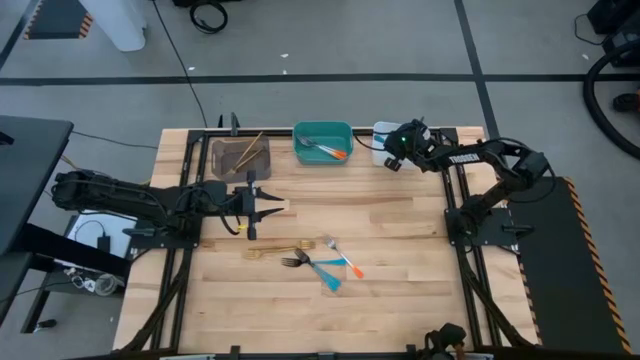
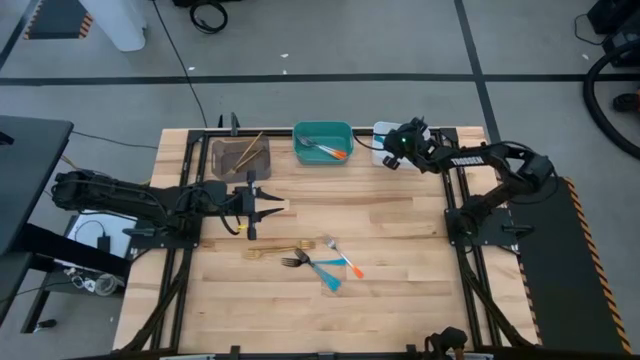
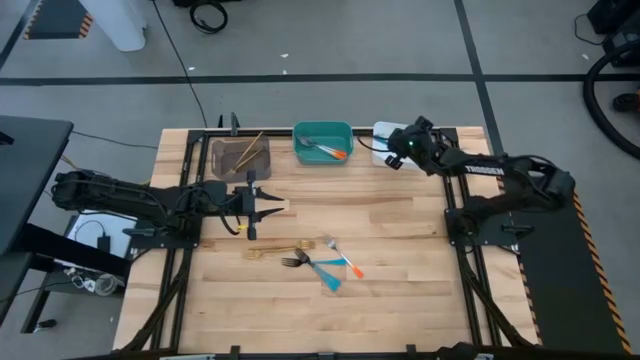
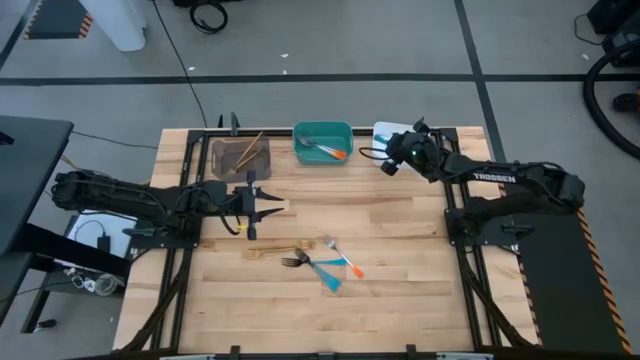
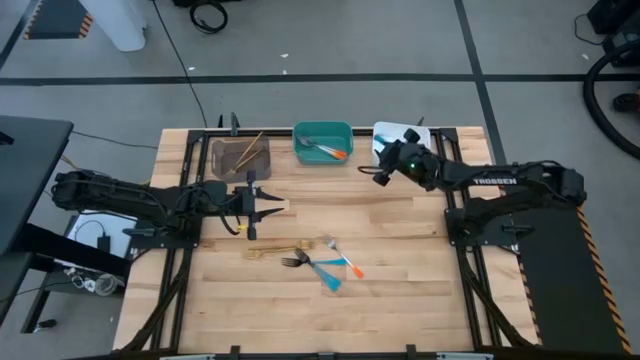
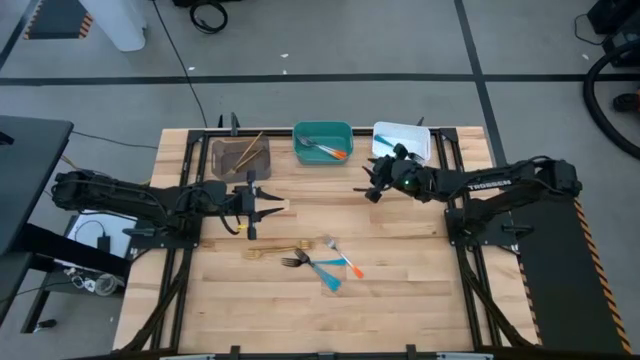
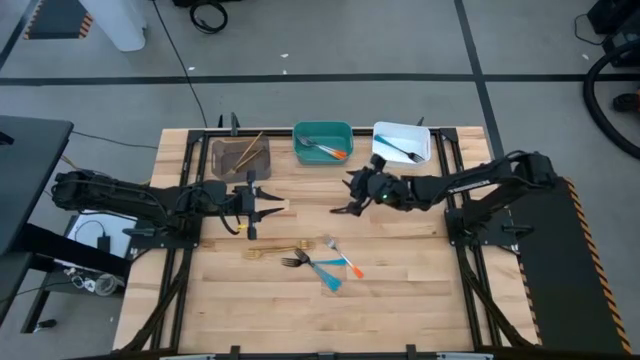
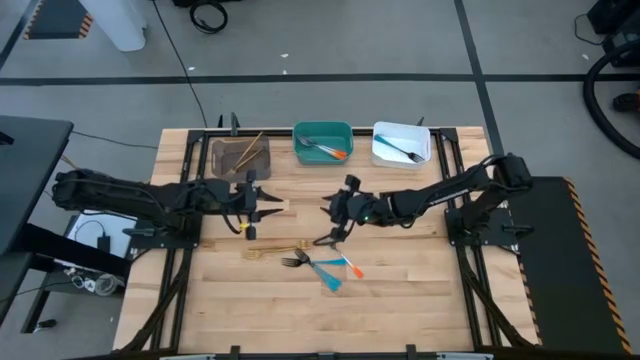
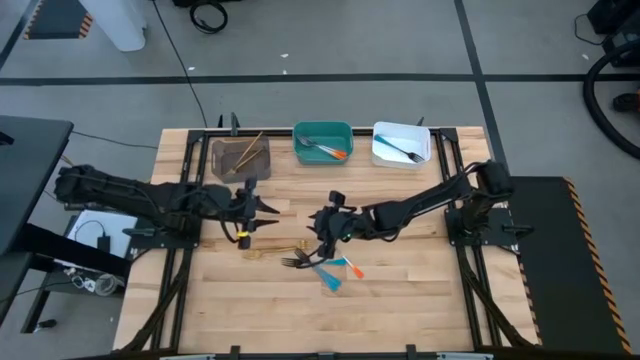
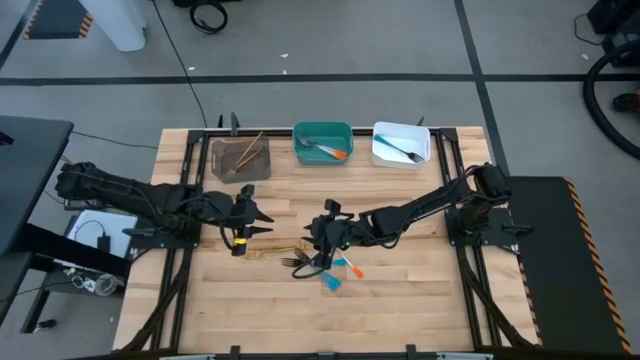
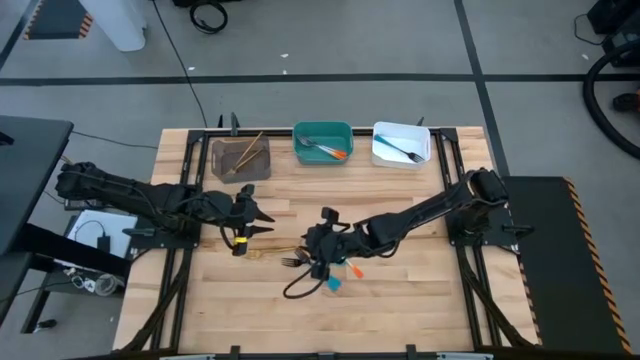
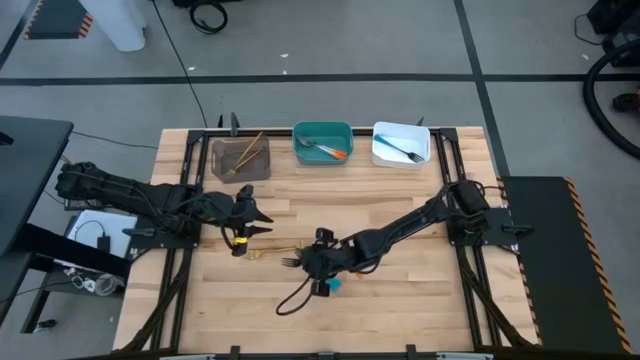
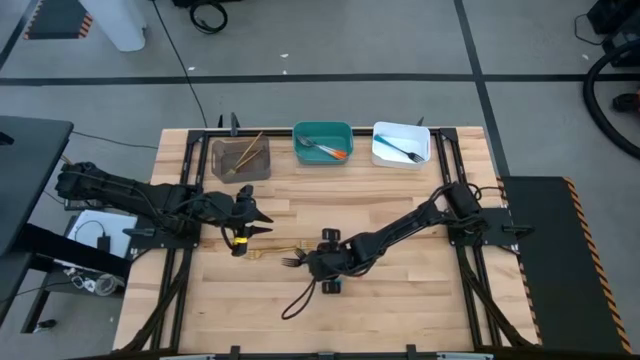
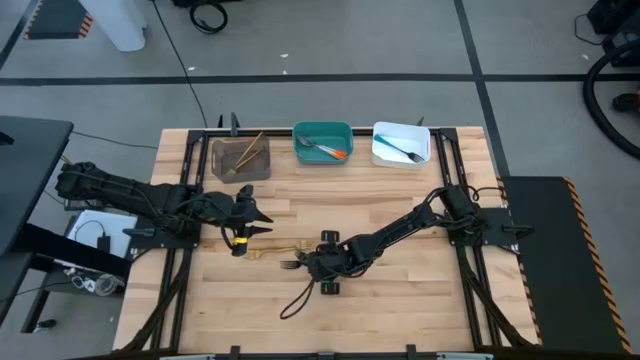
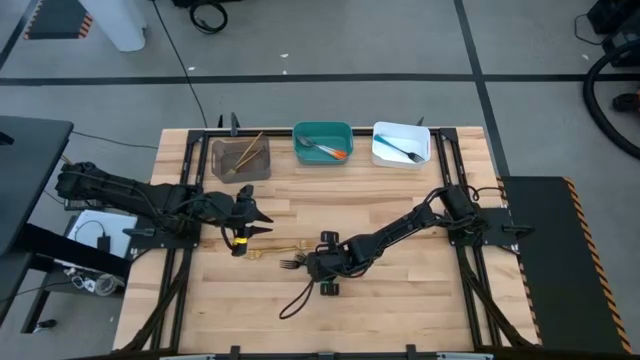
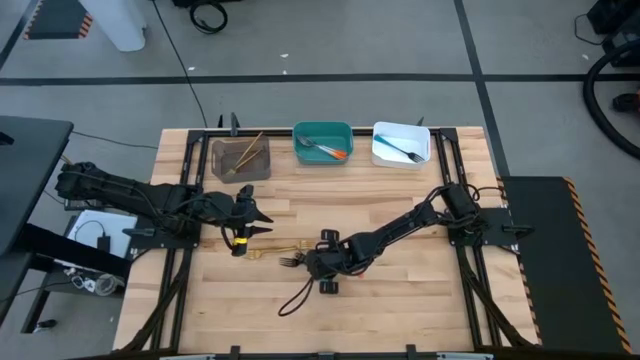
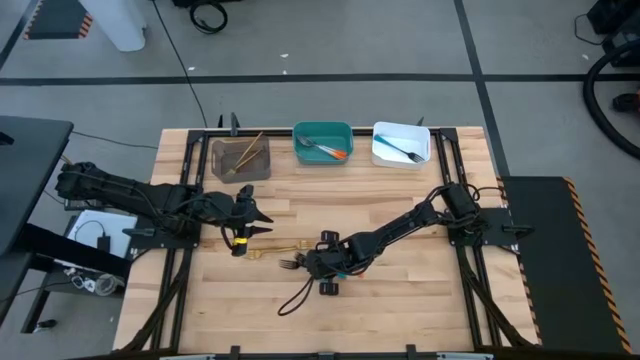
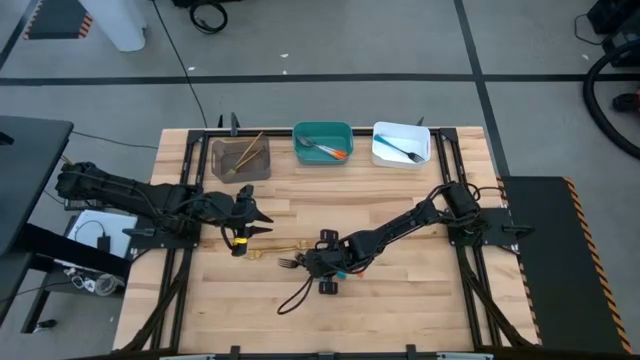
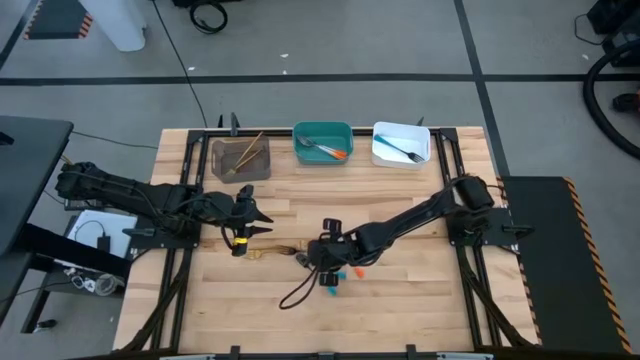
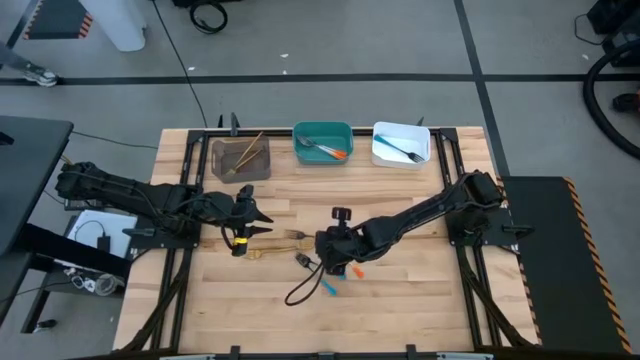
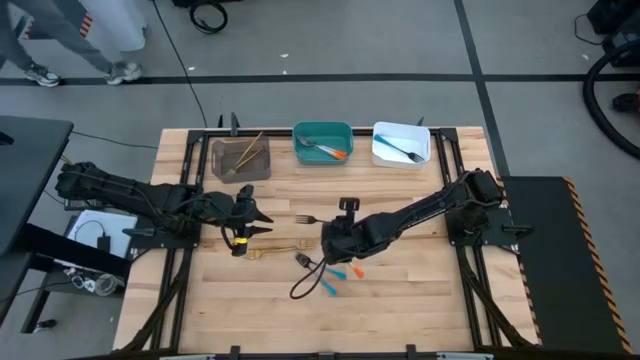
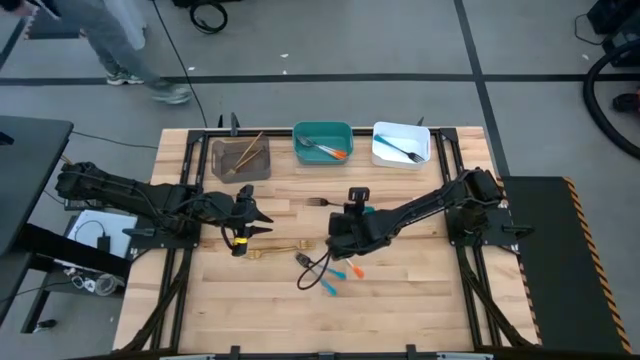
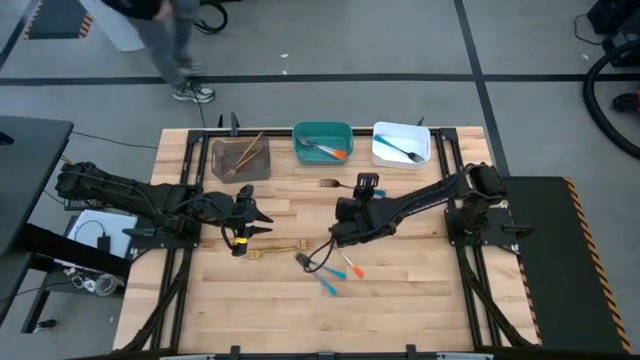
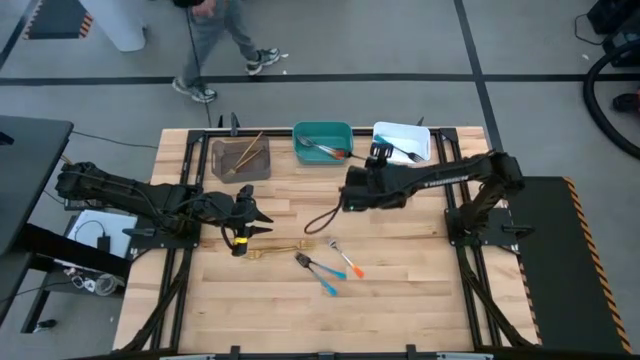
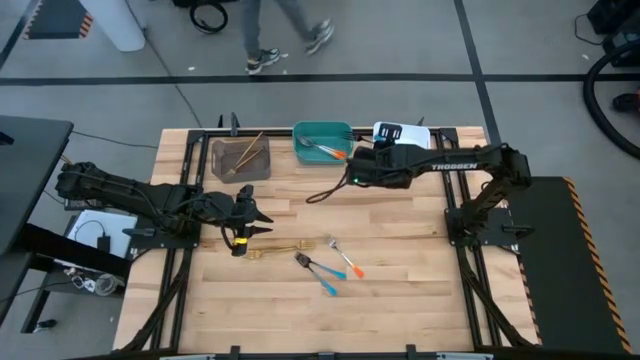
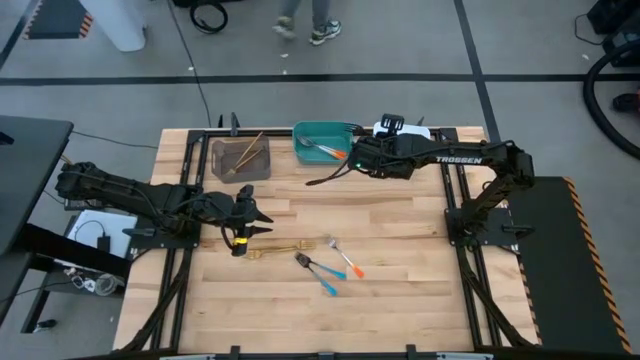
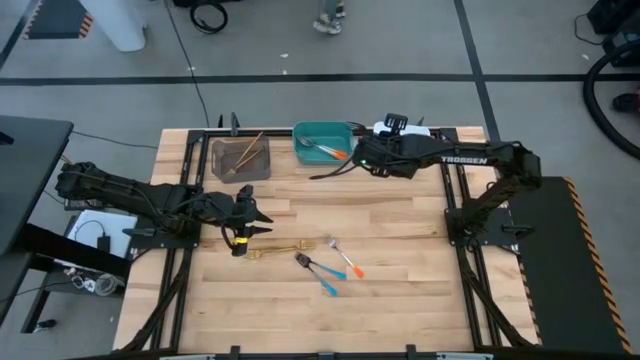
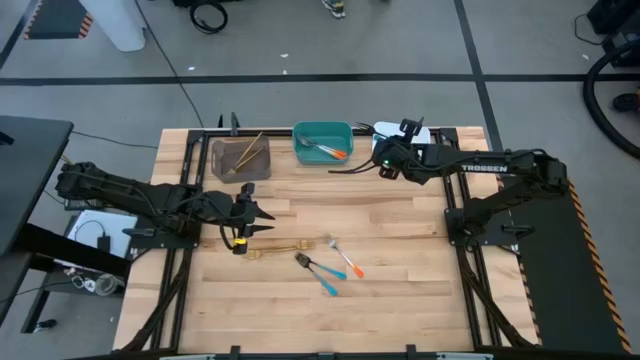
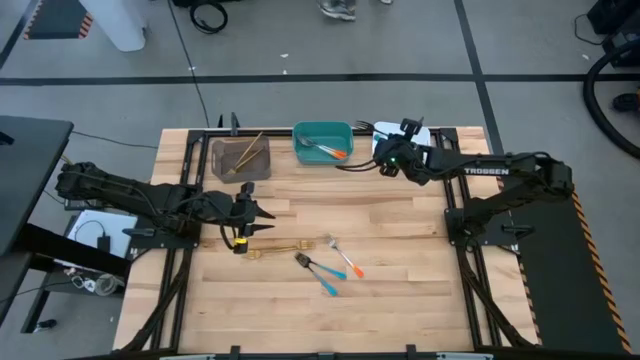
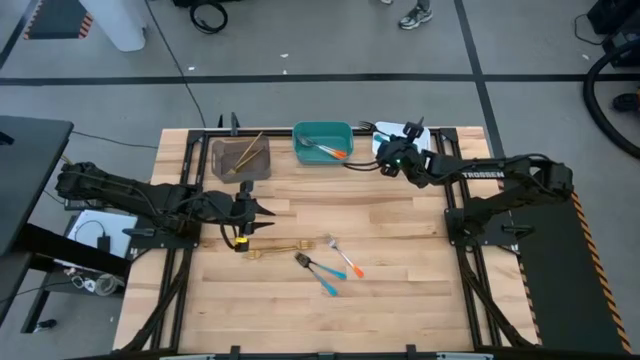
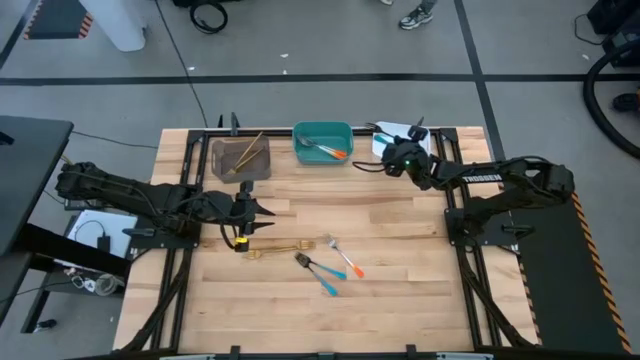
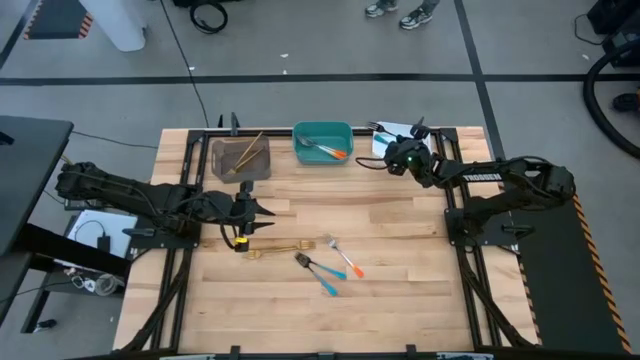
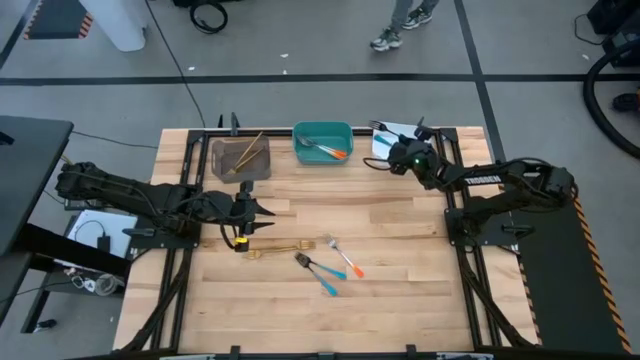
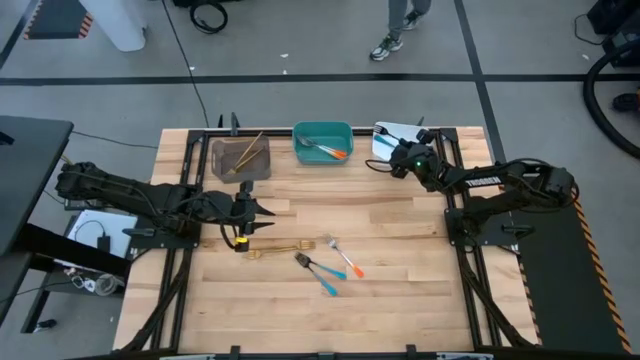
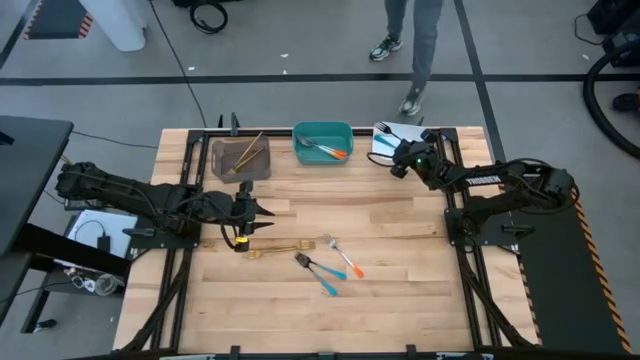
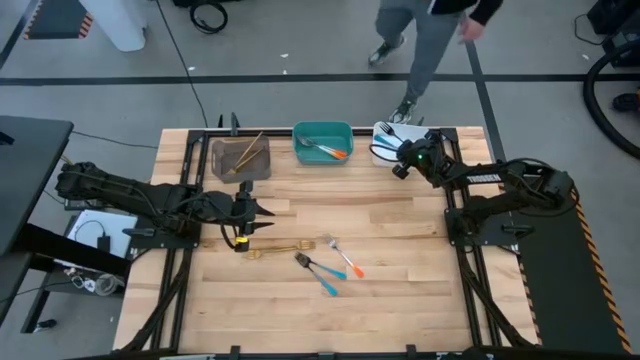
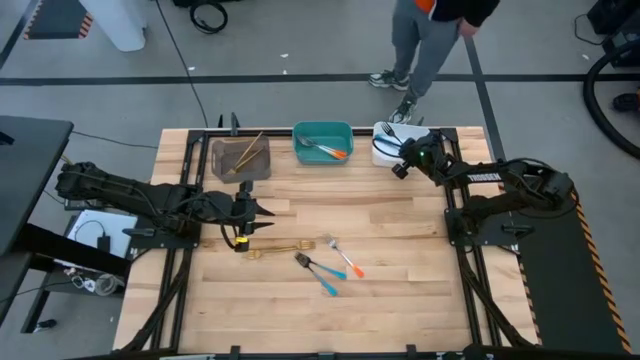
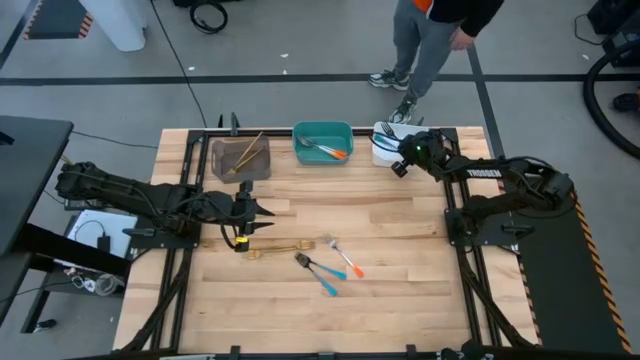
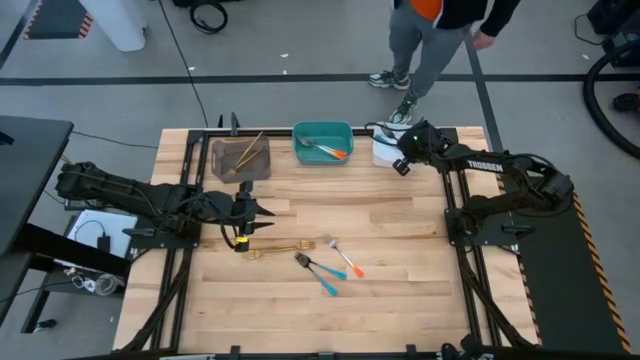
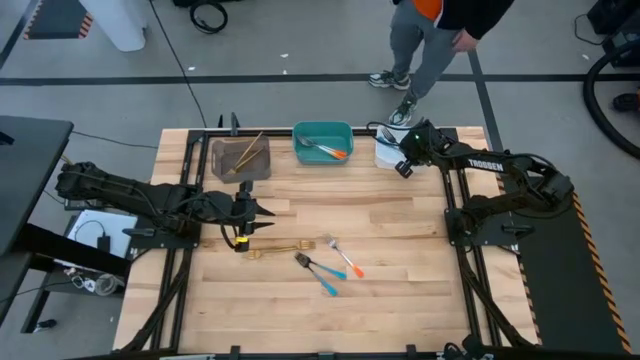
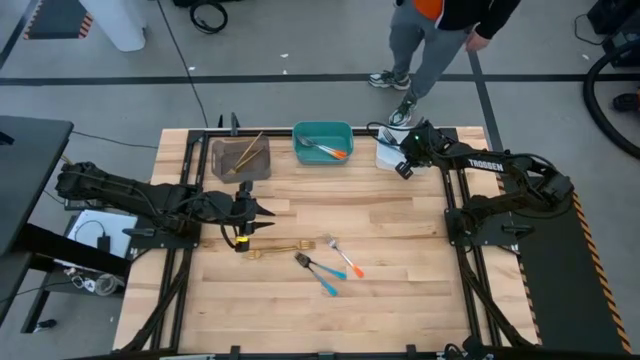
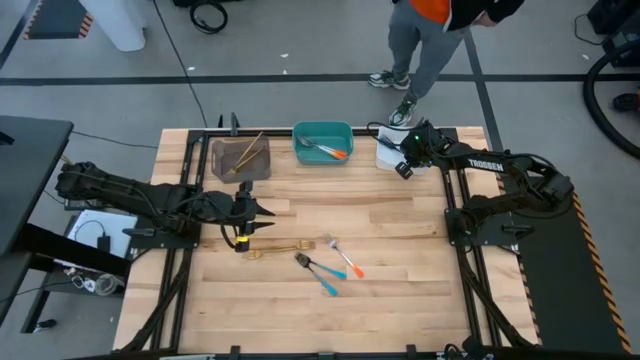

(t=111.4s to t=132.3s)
Task: Sort silverware by color (type)
Put the blue fork into the white bin
